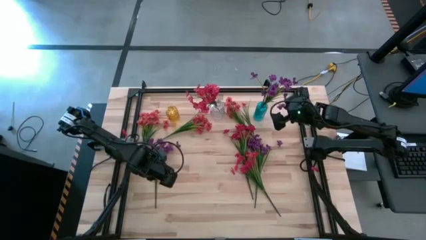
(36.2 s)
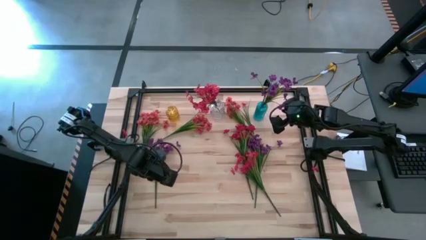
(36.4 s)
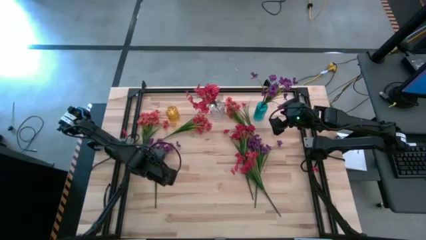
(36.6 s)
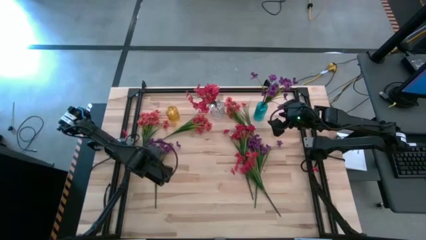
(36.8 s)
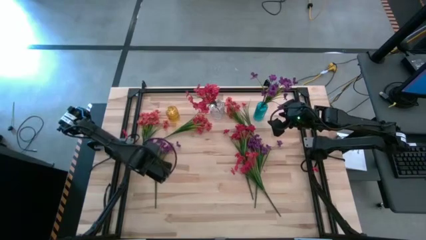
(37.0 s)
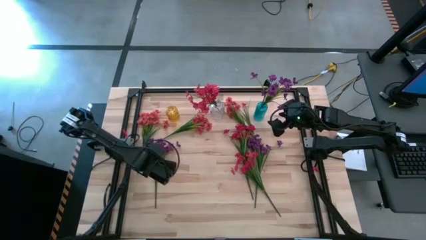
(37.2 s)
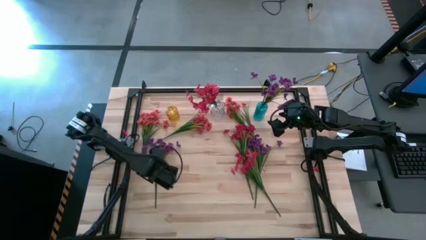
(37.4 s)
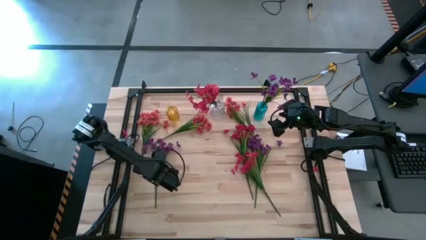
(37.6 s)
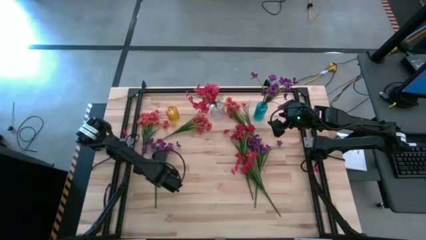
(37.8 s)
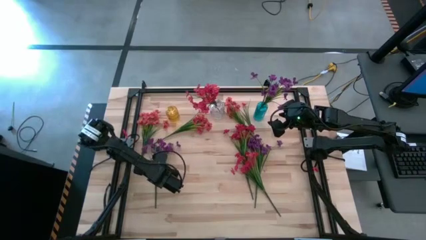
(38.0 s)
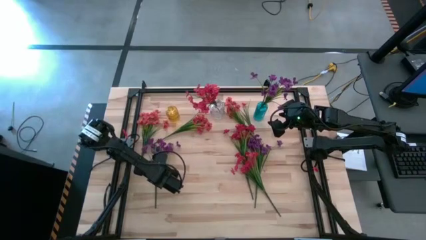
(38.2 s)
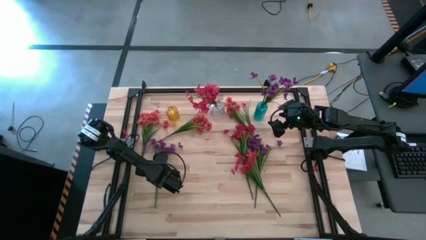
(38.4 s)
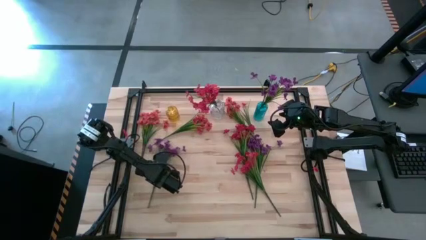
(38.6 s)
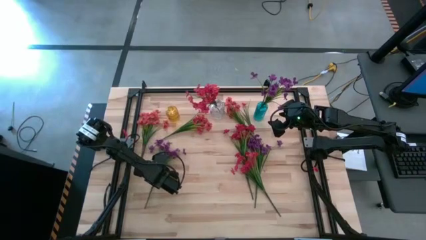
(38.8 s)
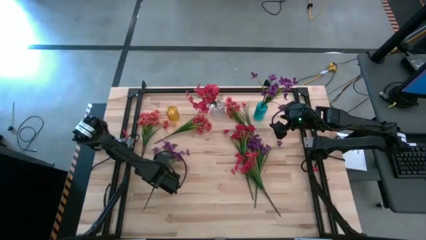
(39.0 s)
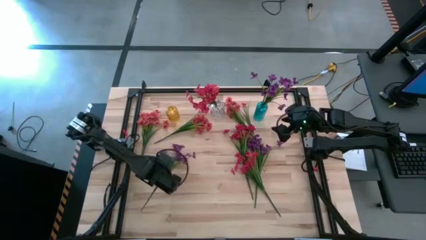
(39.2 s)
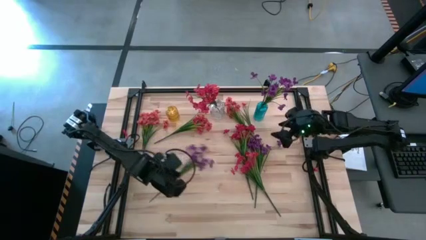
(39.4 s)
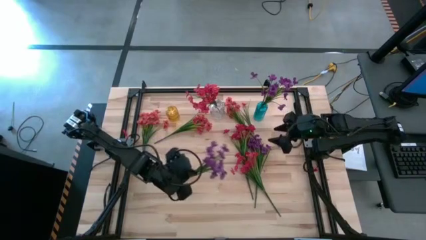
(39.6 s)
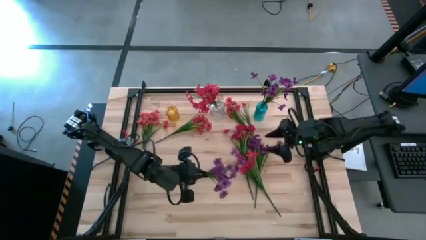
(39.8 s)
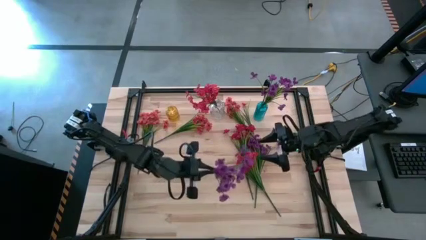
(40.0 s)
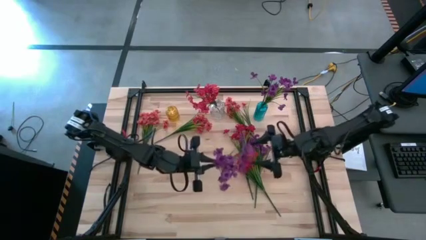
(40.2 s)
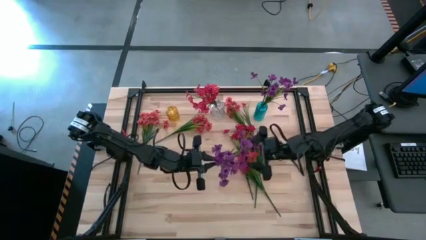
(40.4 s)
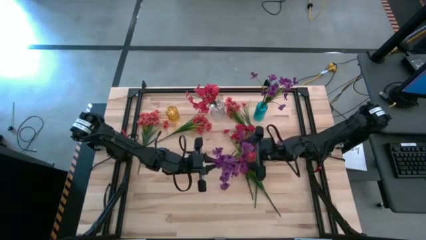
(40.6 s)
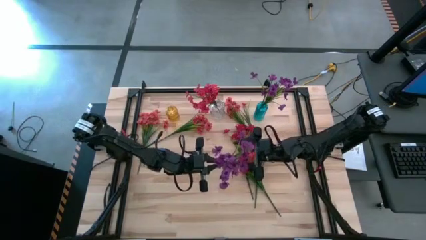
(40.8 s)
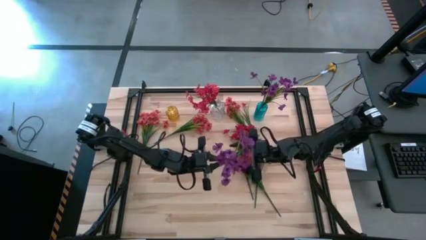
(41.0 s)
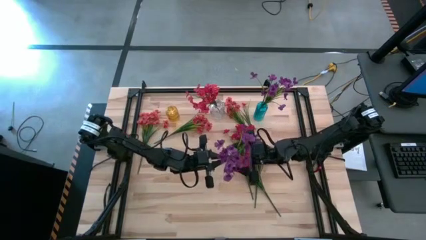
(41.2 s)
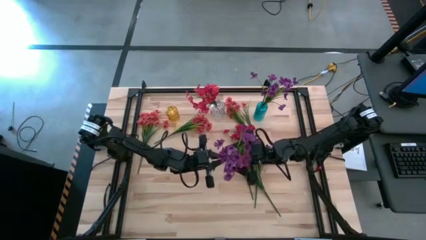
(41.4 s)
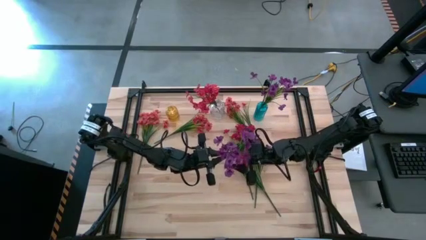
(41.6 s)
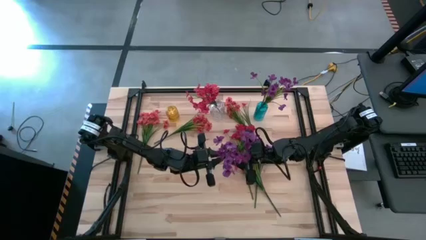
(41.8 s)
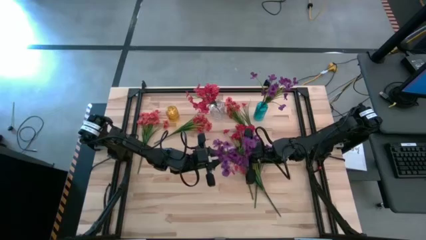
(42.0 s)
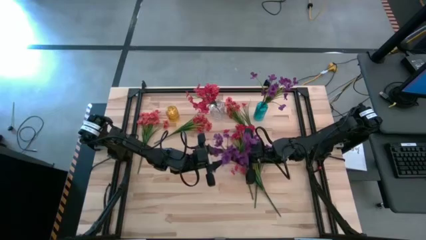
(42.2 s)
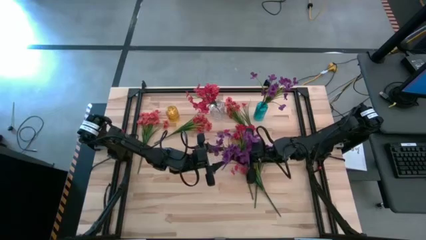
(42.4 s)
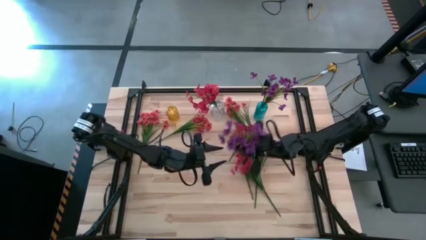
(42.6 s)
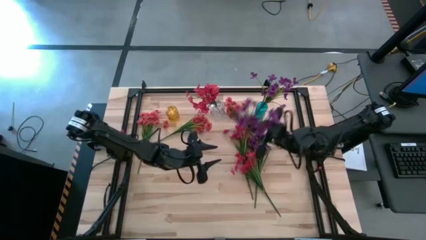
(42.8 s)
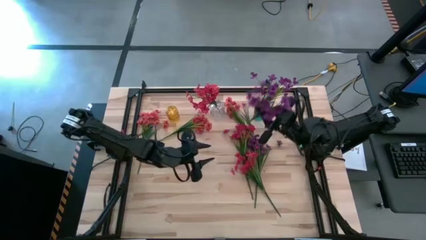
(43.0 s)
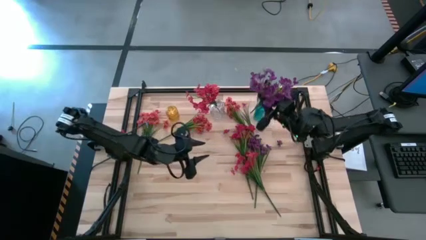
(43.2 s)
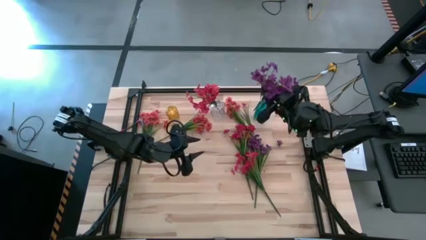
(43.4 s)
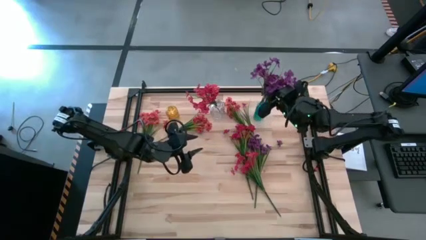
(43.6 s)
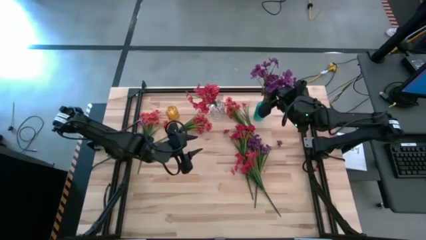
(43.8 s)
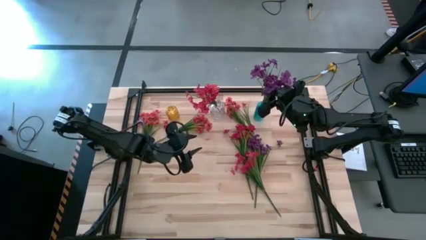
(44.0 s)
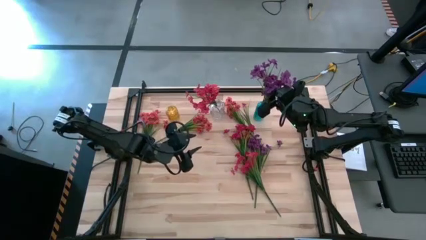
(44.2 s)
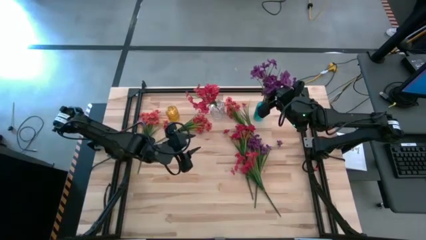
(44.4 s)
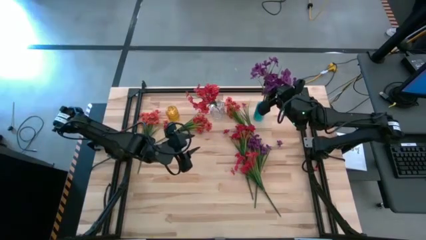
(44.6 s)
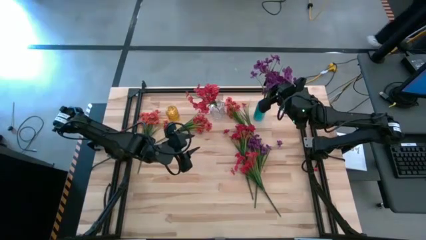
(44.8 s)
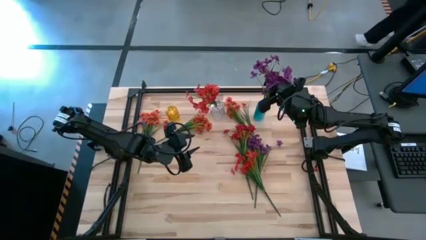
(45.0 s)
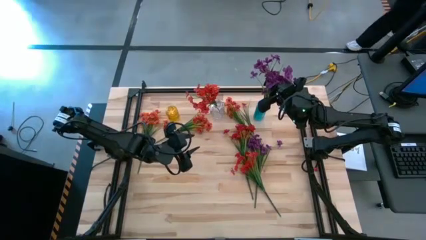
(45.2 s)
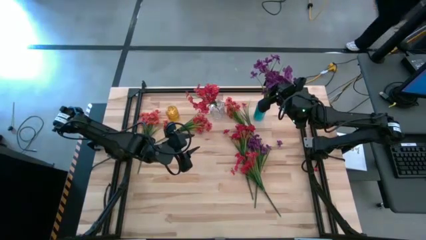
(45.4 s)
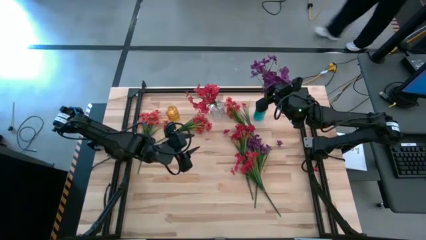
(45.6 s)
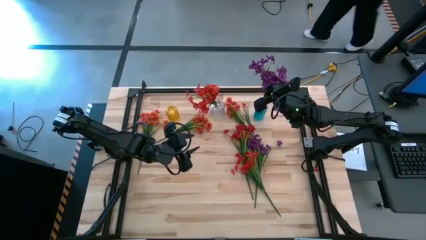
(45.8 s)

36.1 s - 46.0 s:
Task: Sort flowers into vase by color
Put the purple flowers into the blue vase

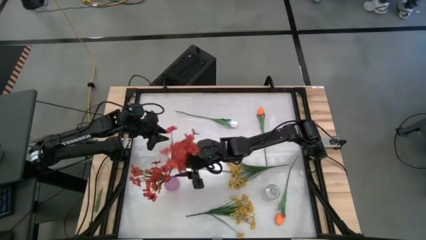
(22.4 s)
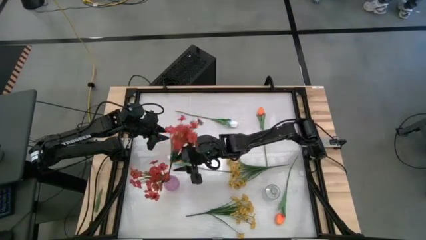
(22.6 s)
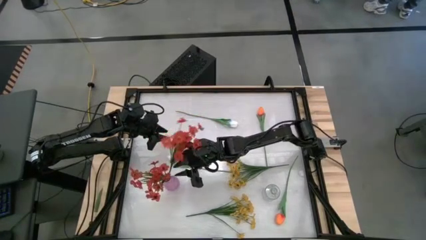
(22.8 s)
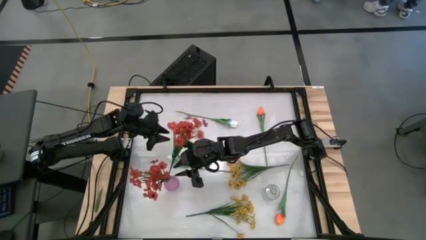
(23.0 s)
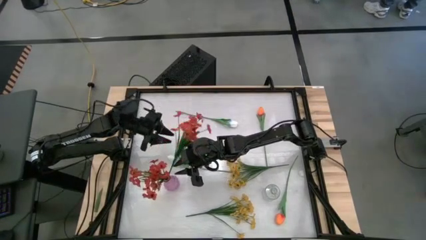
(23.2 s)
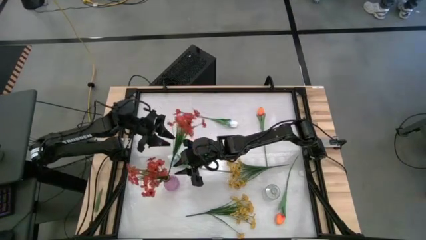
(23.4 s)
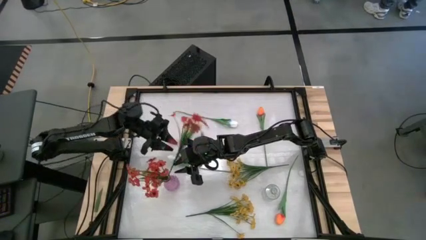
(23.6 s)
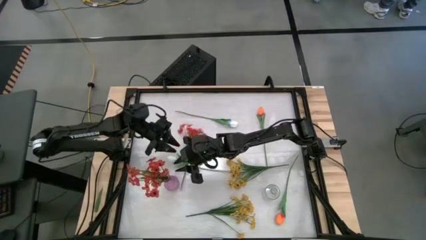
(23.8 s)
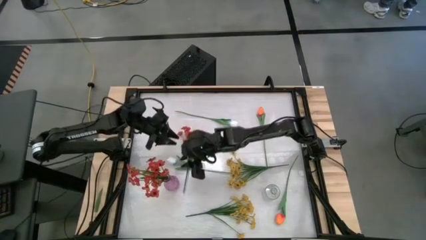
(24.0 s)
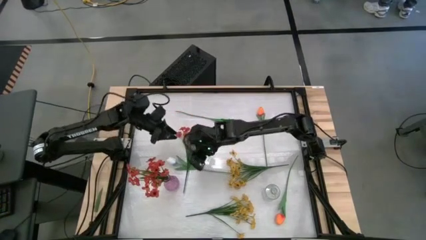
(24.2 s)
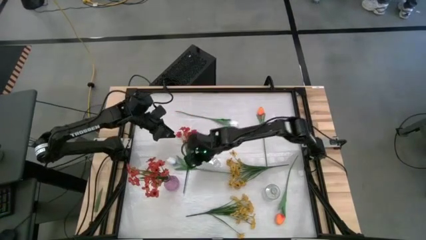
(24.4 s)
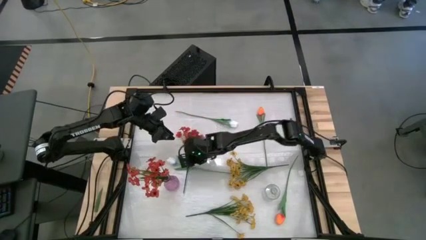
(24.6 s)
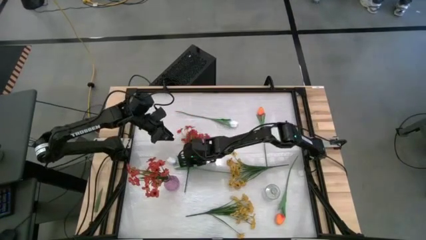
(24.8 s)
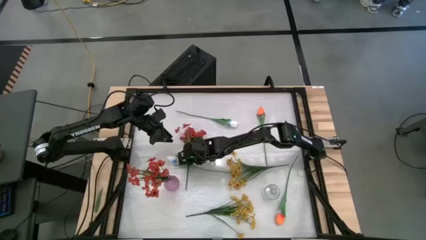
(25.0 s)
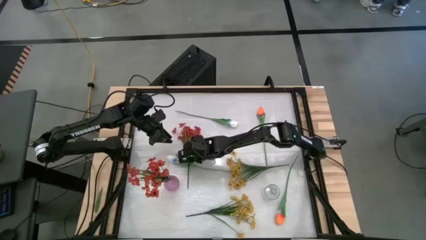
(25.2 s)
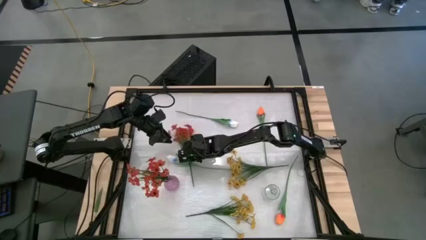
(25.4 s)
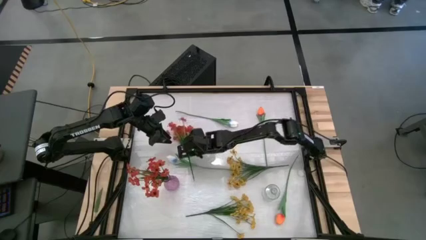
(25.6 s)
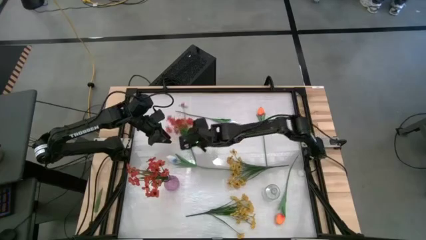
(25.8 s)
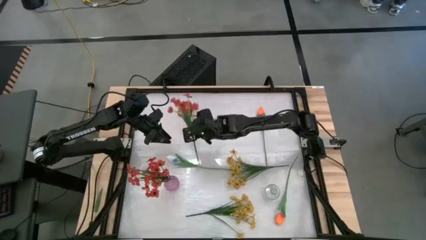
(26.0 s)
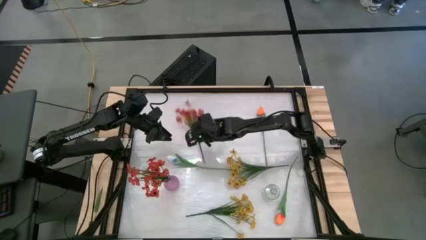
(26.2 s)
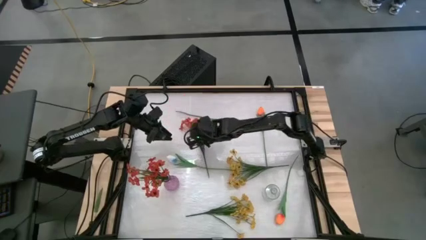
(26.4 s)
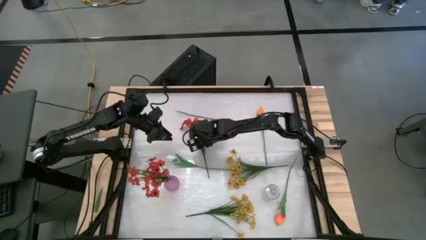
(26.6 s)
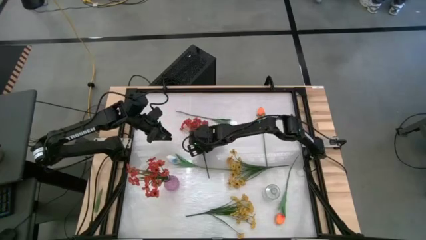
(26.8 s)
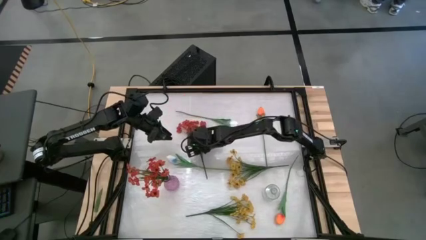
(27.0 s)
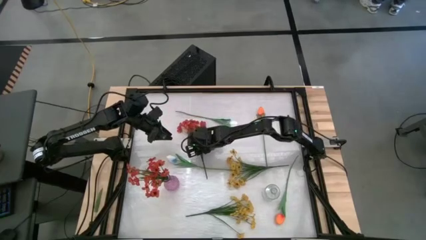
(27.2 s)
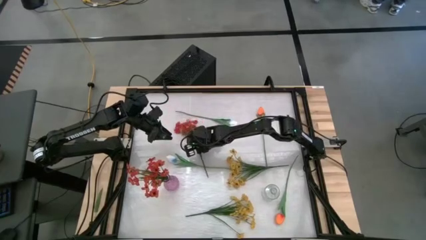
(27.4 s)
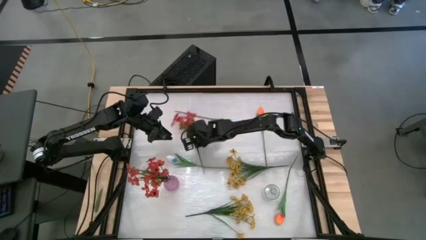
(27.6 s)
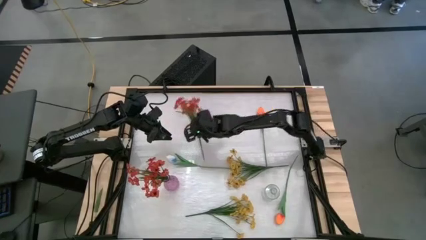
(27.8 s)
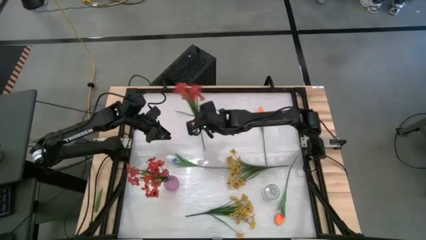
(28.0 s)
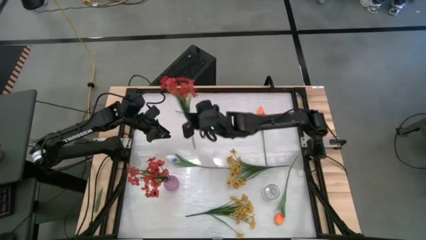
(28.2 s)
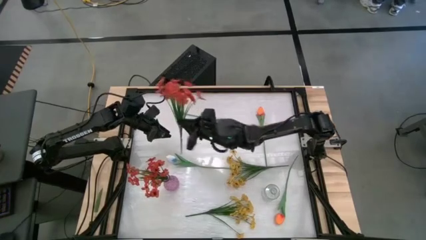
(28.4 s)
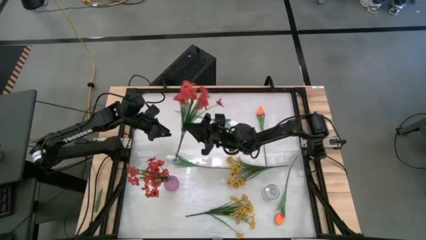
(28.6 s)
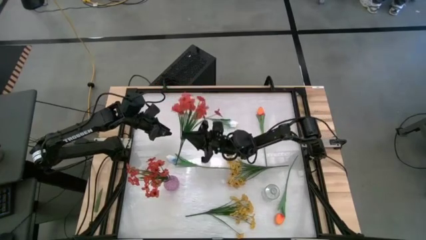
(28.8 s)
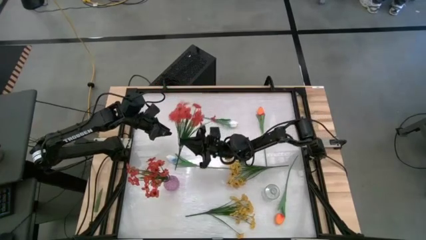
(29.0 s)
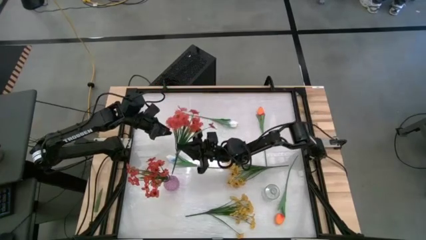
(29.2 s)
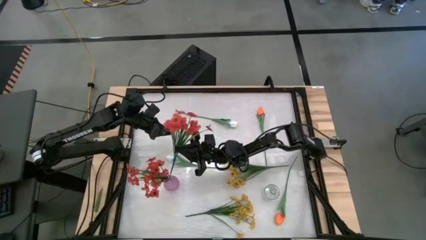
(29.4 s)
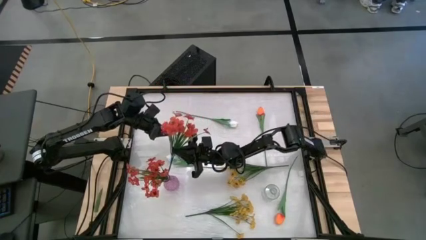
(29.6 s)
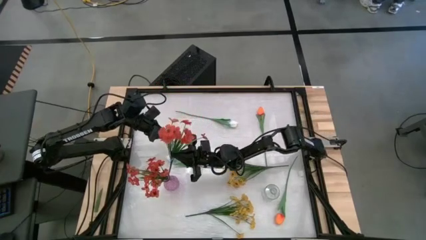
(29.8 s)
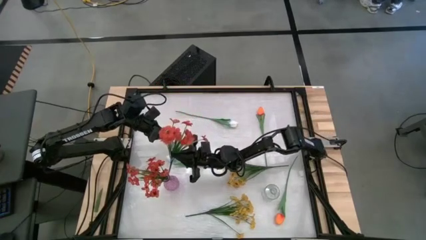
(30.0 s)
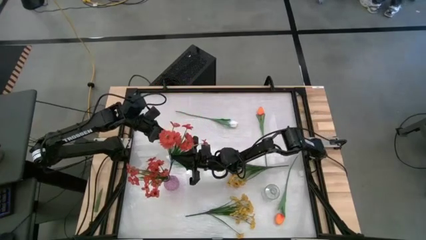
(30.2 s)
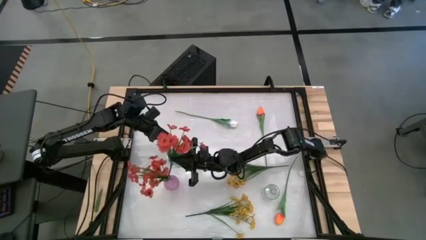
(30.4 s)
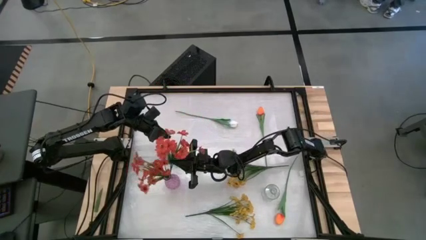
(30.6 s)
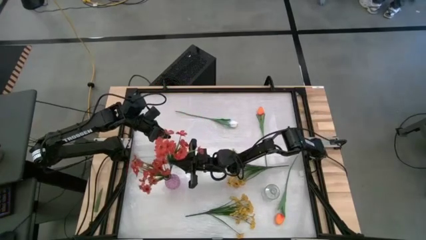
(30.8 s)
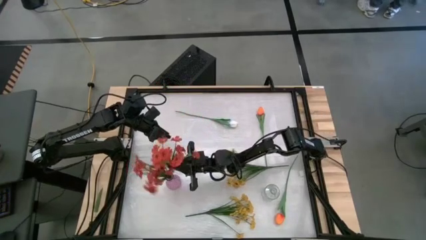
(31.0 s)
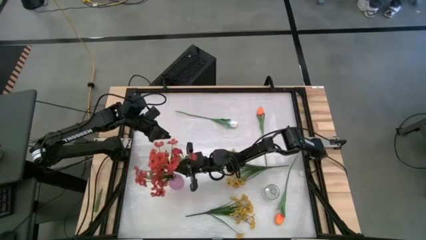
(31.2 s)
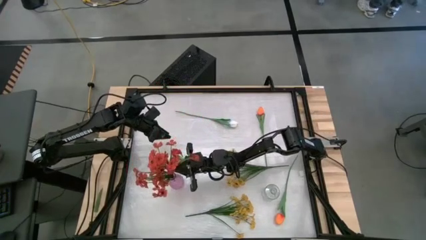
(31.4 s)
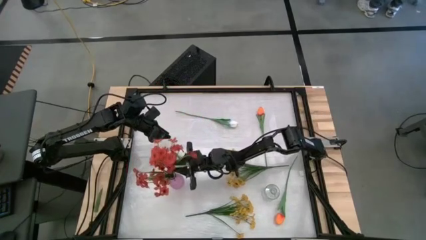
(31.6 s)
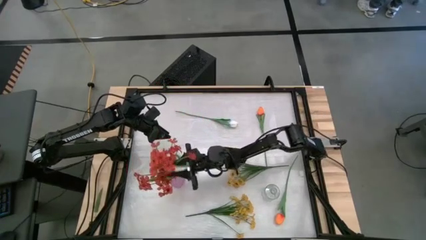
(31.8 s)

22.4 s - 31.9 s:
Task: Sort flowers into vase by color
Put the red flowers into the purple vase
